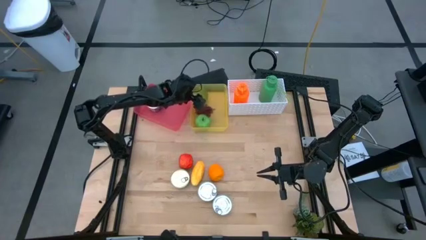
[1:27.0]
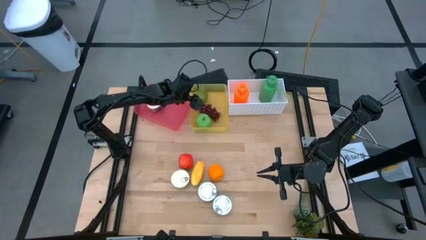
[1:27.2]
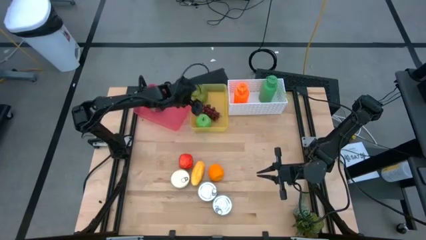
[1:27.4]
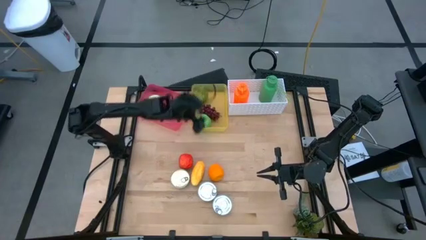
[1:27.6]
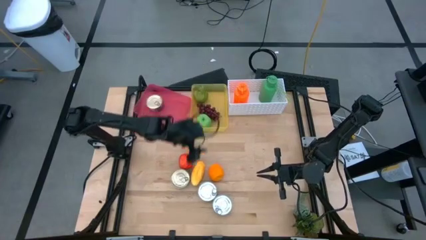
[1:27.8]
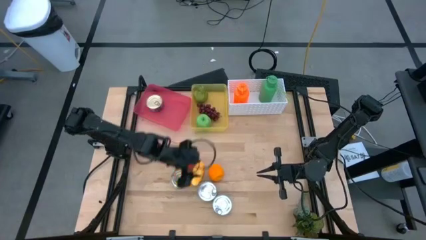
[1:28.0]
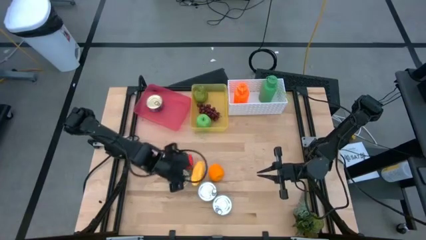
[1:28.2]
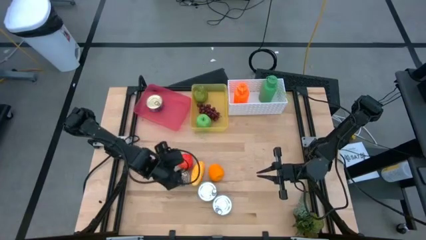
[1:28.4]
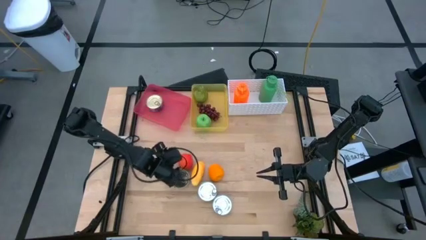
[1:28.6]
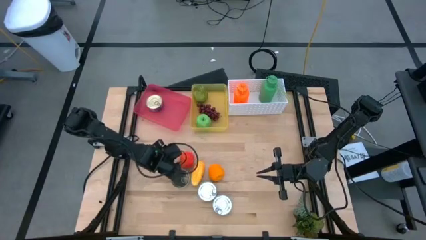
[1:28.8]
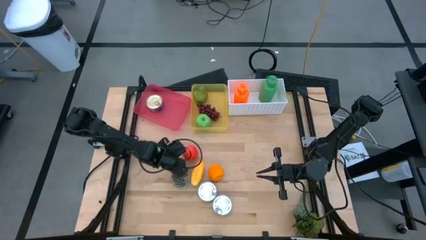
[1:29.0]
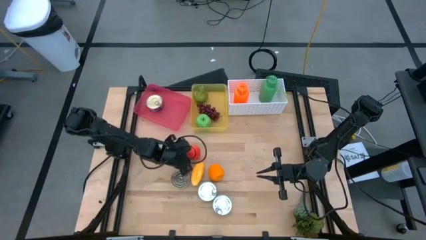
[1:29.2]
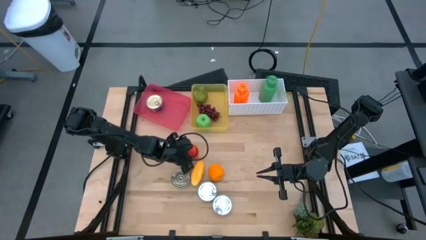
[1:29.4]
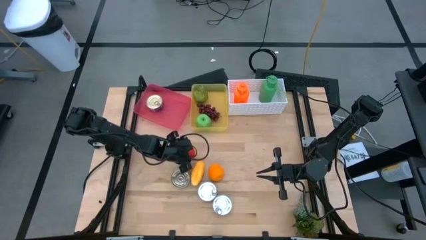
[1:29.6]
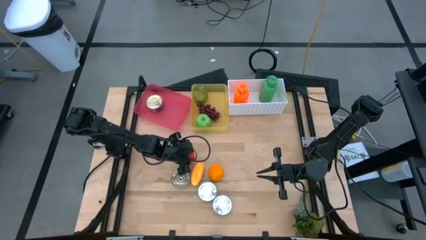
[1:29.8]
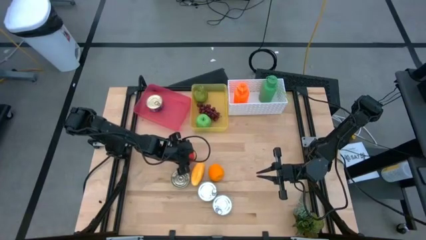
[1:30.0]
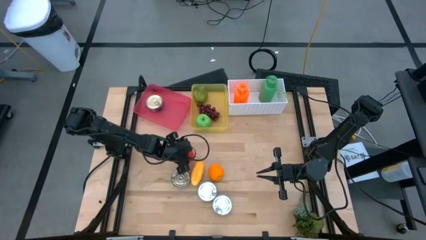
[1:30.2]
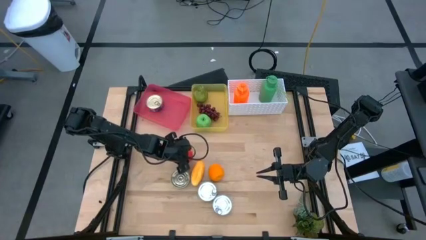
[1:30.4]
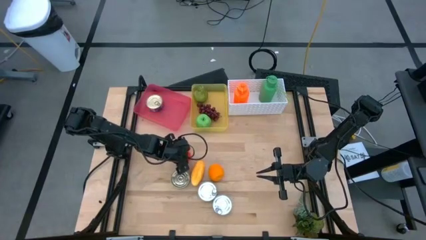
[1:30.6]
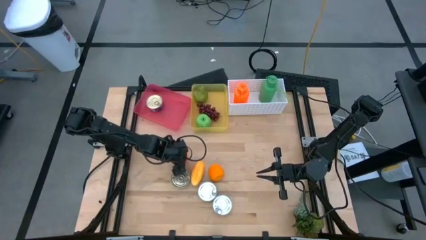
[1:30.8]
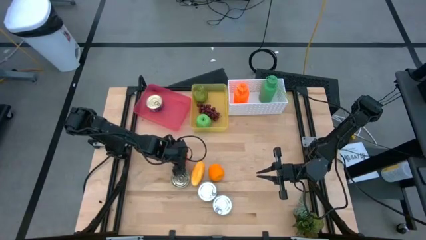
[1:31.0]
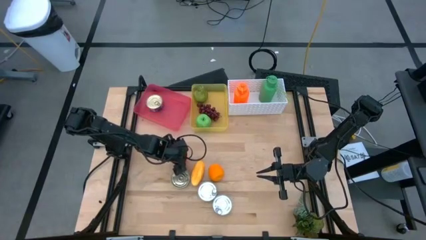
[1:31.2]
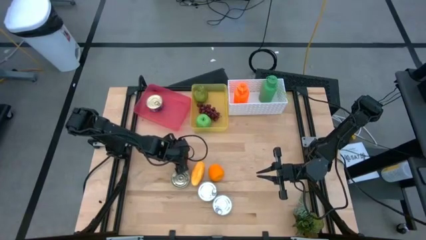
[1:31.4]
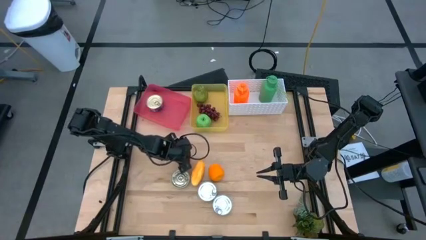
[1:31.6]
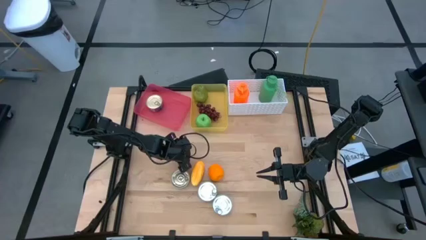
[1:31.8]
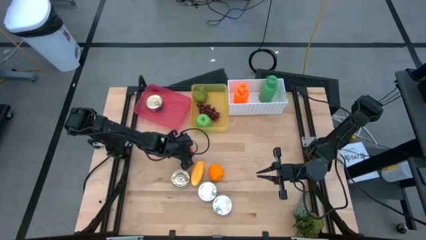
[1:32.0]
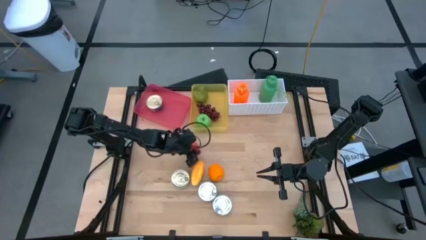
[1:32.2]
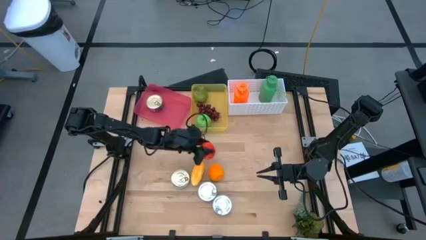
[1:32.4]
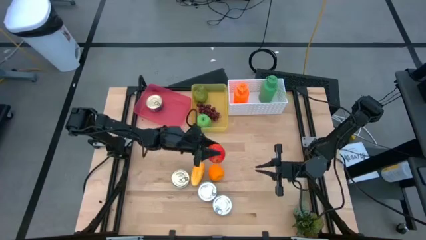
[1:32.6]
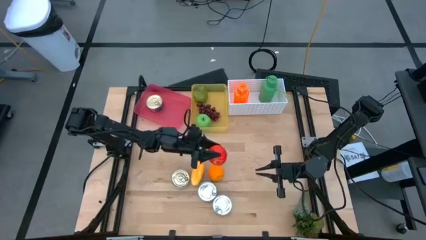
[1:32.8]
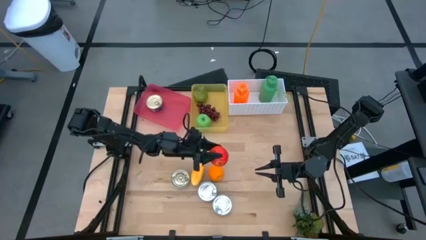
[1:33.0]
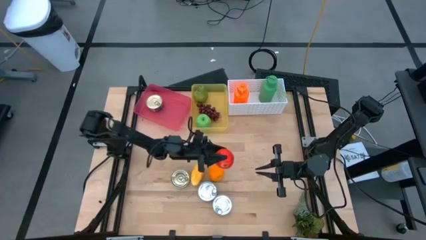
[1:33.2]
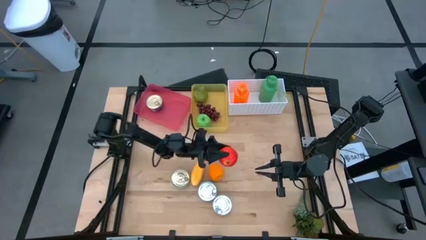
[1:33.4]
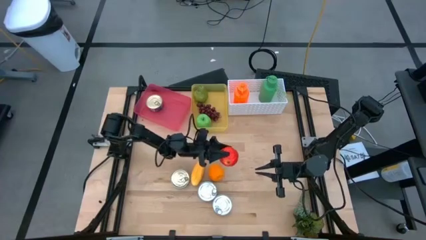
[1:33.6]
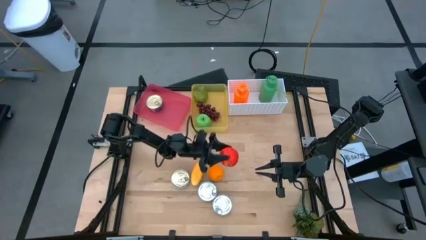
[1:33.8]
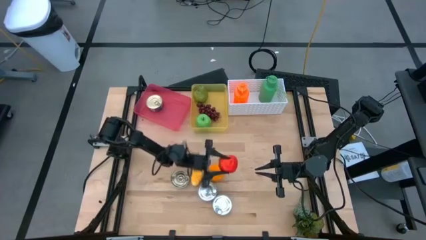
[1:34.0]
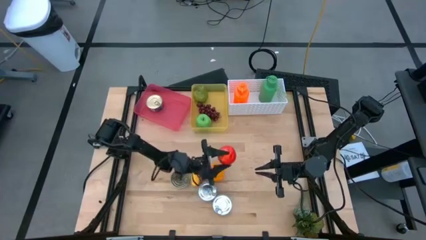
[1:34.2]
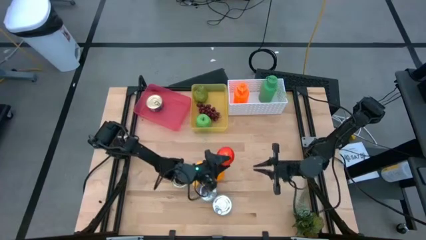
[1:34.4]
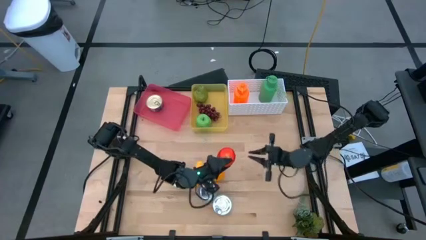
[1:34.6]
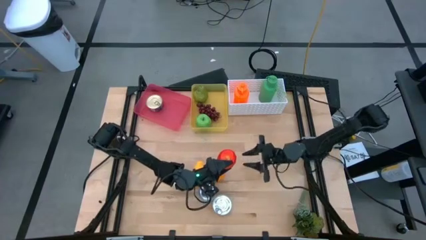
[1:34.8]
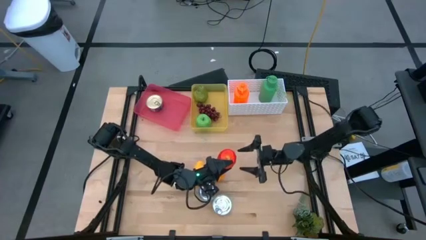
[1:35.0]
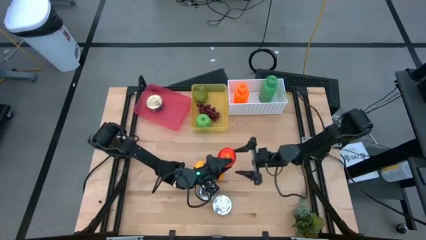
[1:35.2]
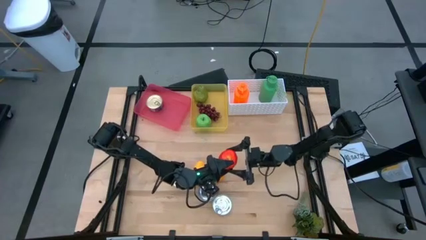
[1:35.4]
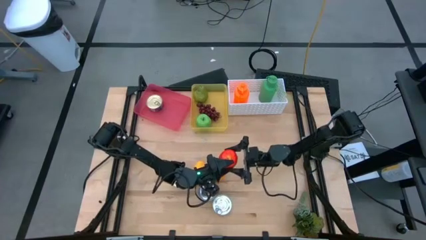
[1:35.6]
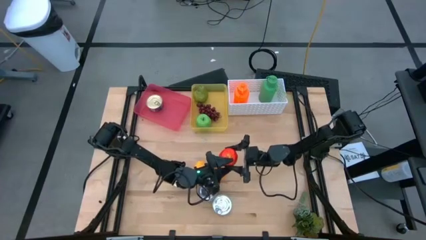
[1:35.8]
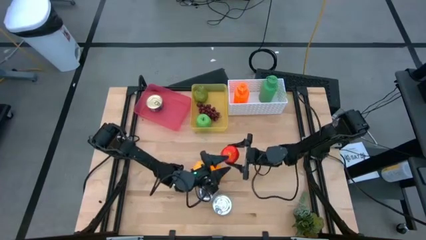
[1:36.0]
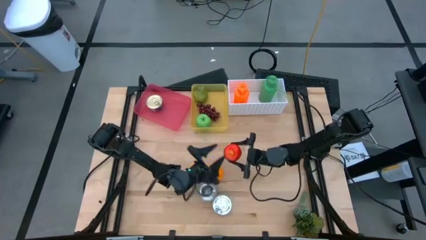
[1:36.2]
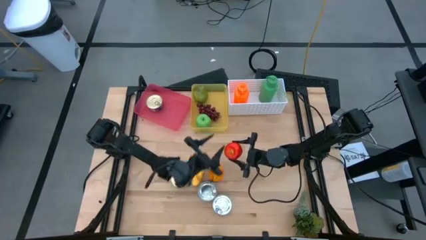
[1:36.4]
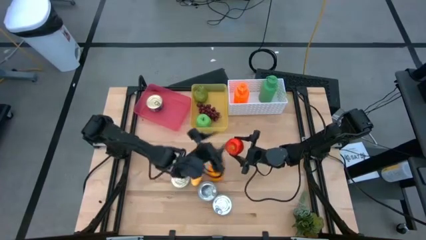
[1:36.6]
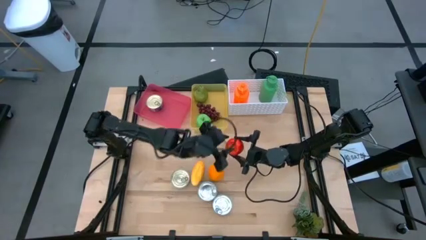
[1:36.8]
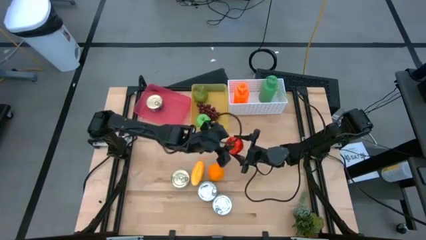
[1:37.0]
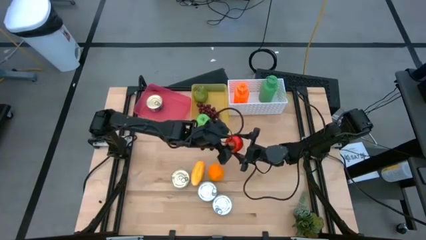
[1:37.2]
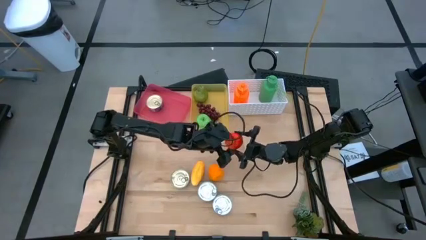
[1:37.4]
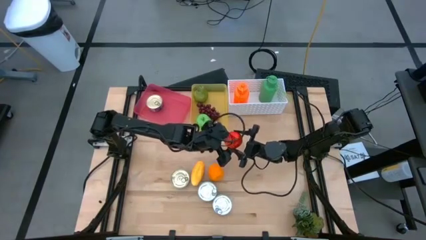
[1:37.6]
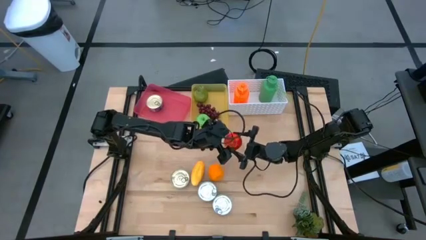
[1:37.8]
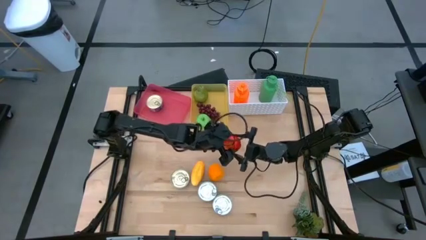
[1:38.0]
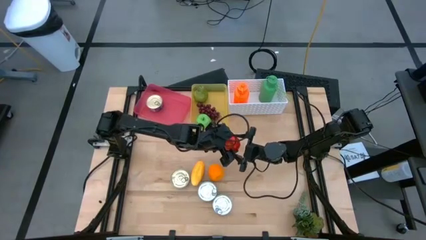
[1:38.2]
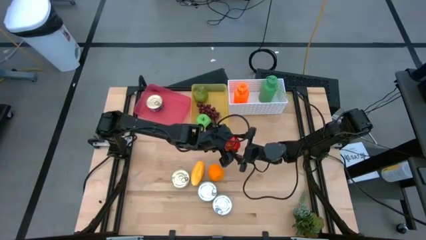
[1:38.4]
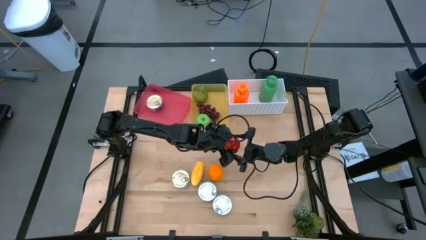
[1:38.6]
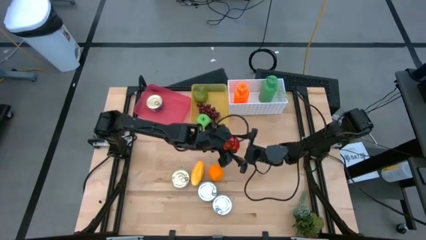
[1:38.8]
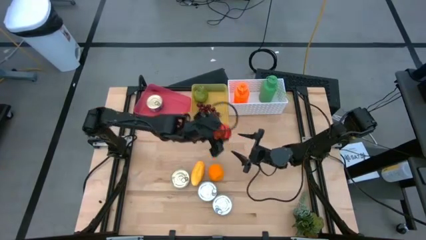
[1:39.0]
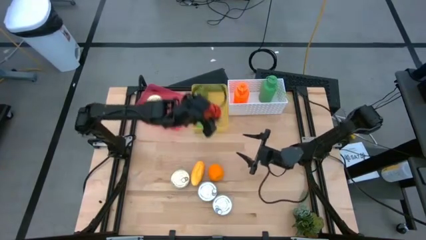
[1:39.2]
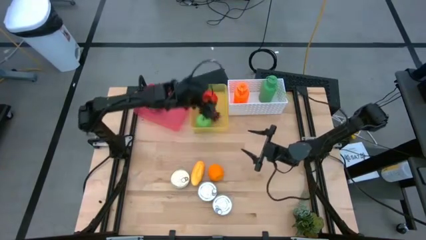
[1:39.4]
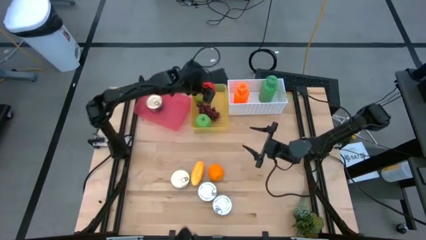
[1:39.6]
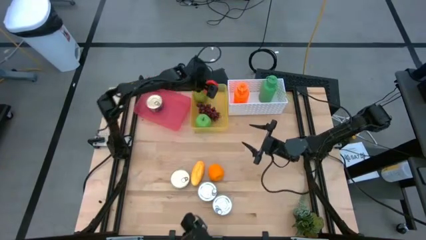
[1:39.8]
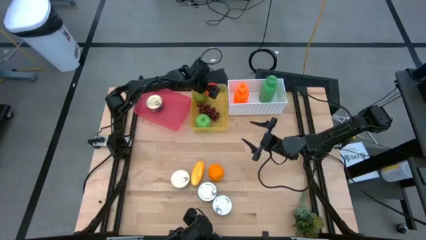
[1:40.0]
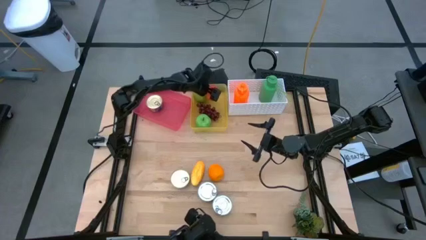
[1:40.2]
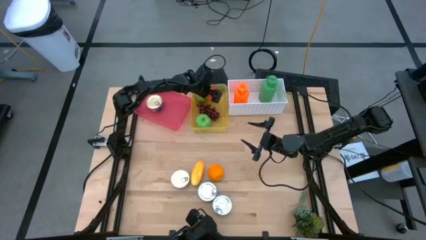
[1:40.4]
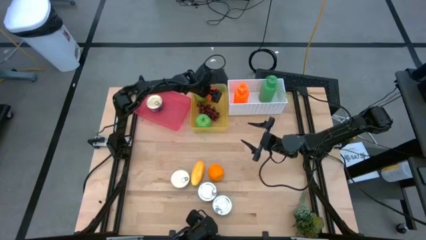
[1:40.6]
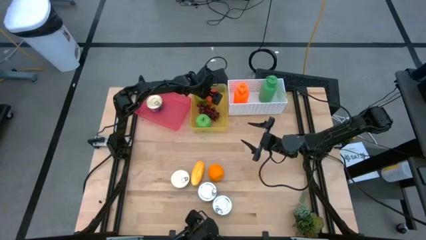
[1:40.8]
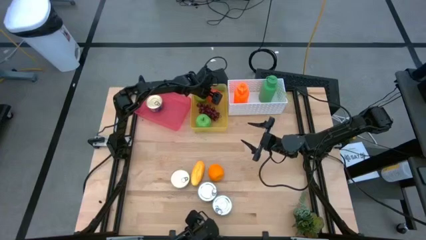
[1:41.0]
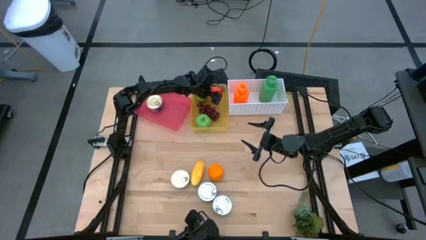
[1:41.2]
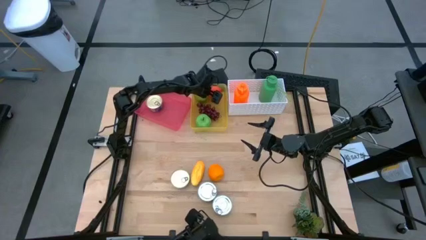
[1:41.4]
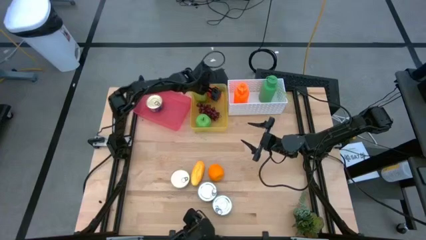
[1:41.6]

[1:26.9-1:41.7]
Task: Pick & Place Food Item
Put the red apple into the yellow bin

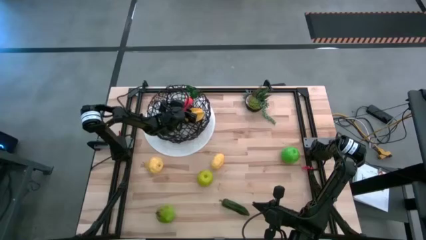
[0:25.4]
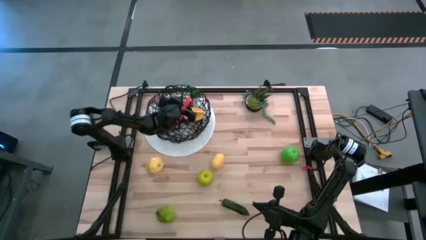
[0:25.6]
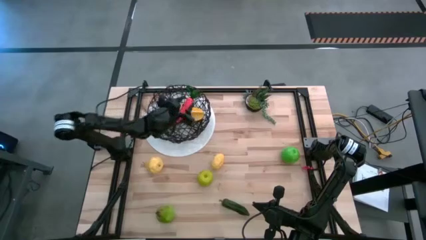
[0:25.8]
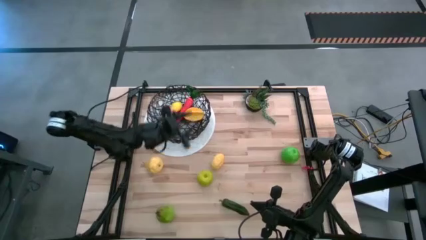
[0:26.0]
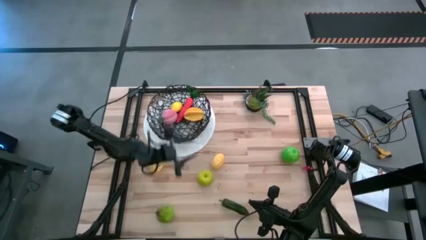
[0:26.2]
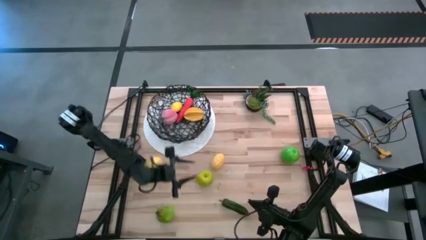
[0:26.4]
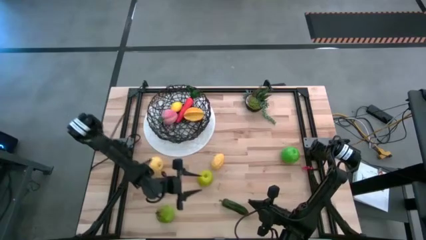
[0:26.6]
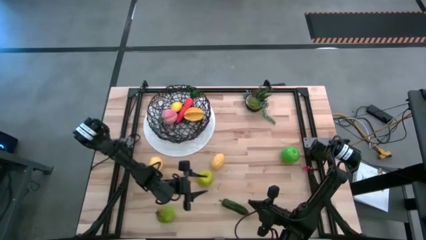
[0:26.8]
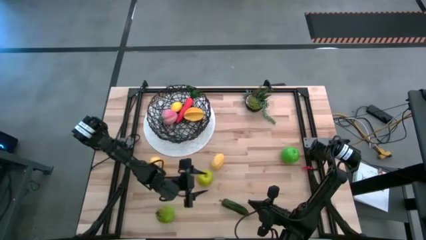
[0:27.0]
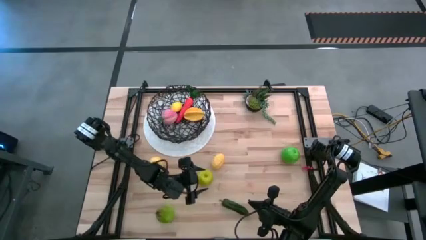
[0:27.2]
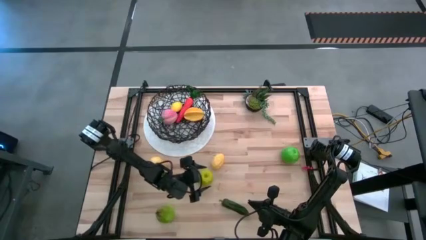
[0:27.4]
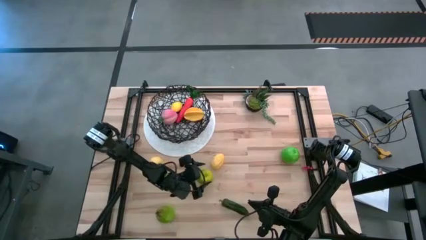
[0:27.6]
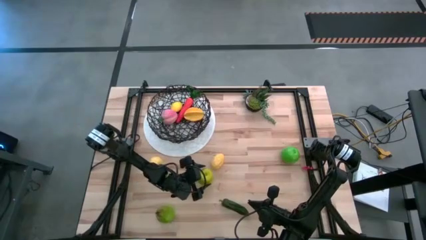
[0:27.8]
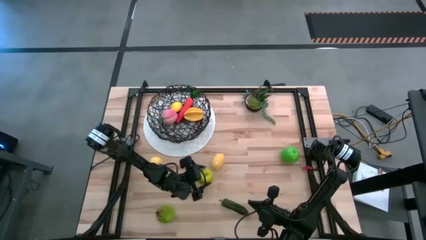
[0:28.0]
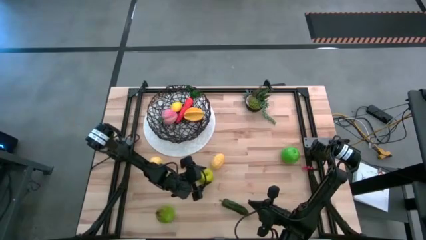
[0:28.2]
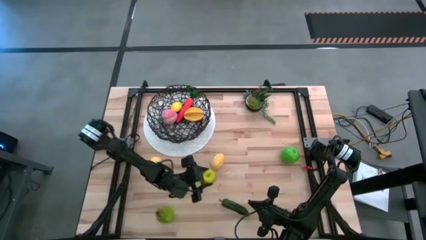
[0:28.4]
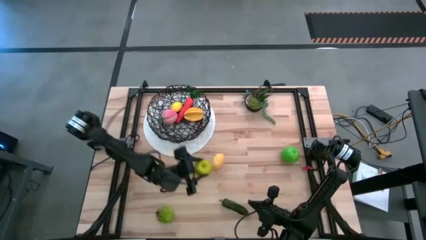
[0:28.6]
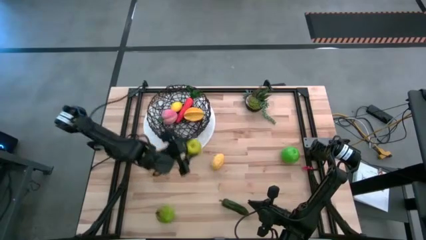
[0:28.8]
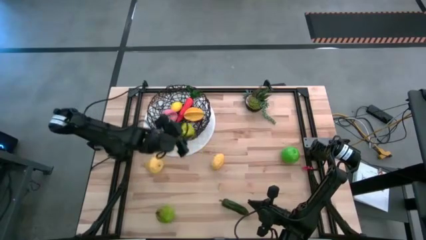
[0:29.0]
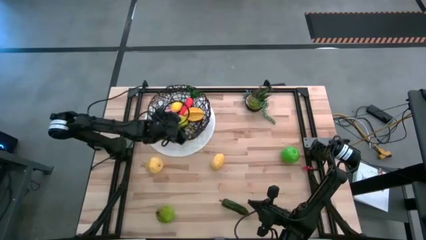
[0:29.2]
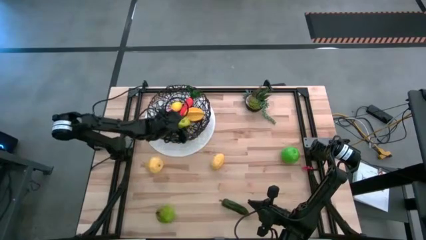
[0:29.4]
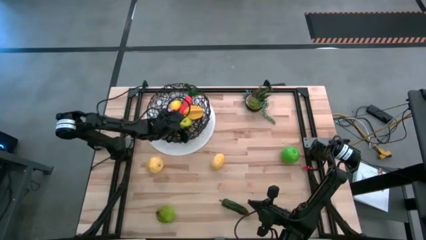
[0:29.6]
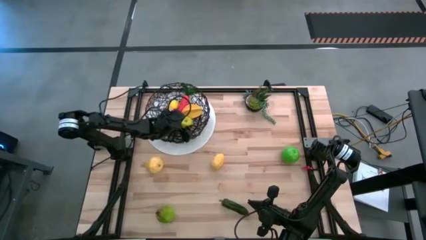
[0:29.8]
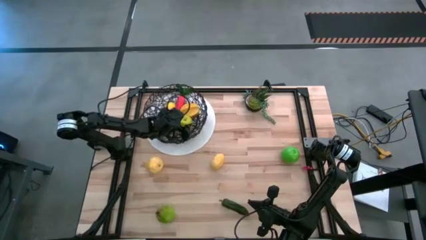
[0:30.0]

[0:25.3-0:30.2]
Task: Build produce basket
Put the green apple into the wire basket
